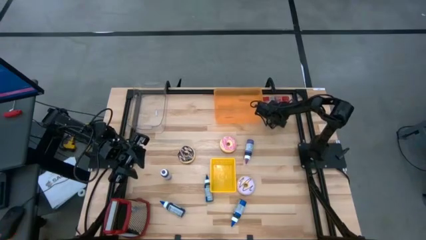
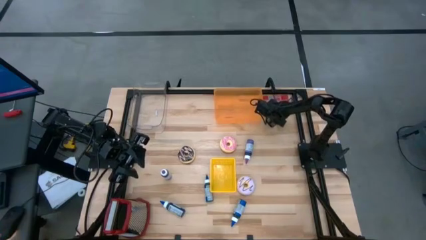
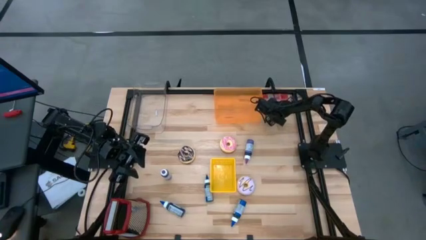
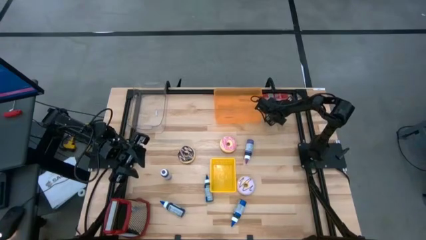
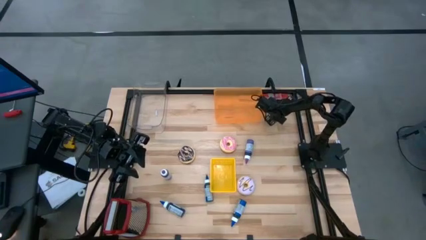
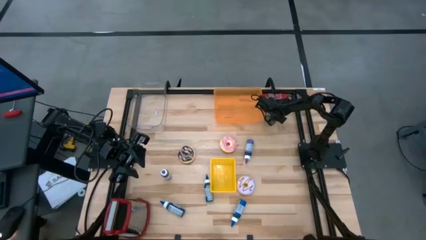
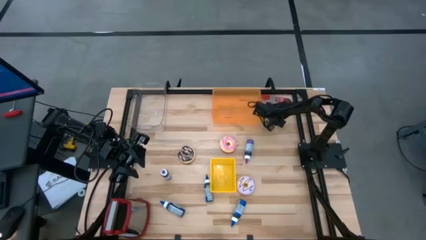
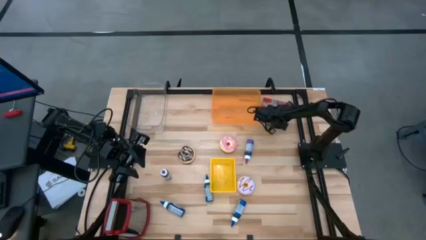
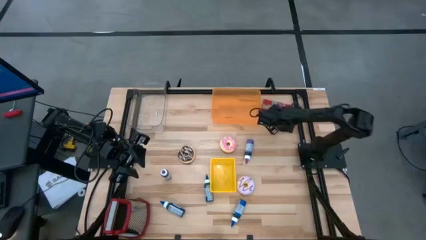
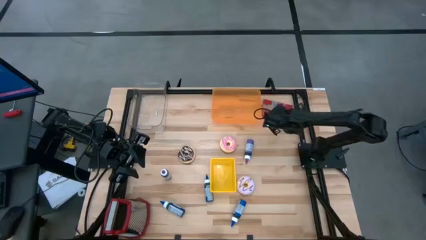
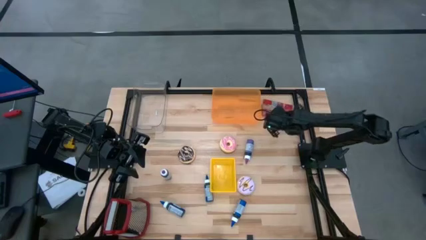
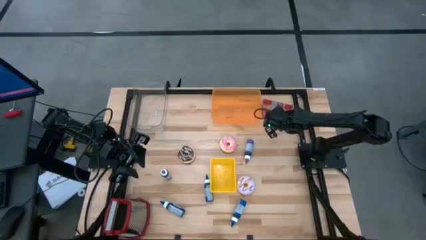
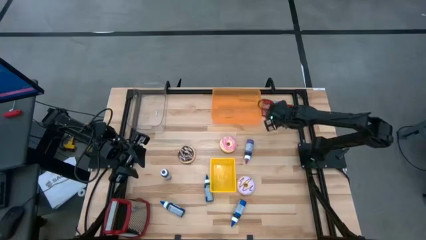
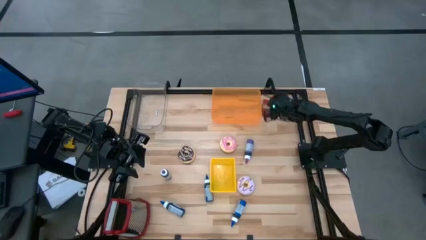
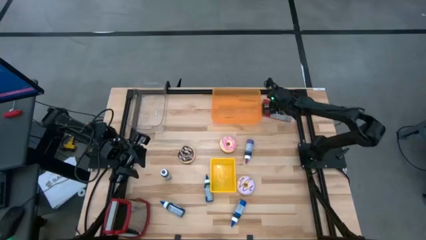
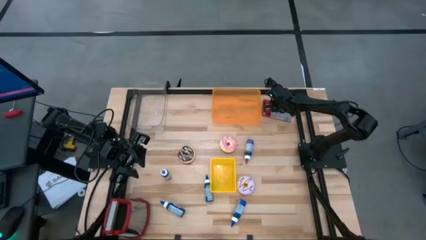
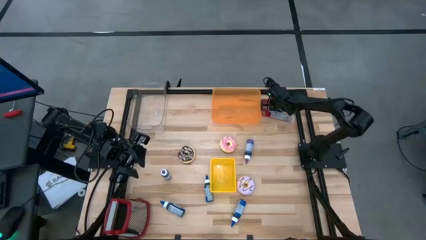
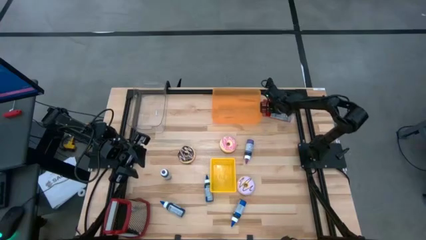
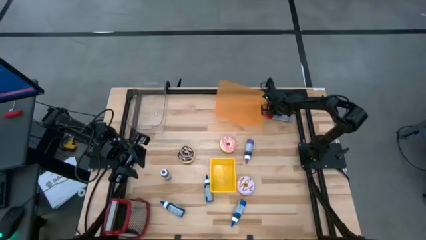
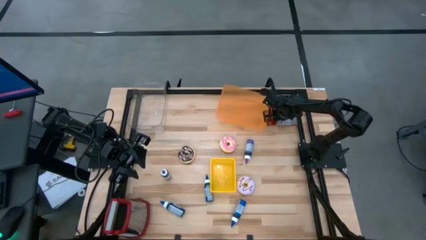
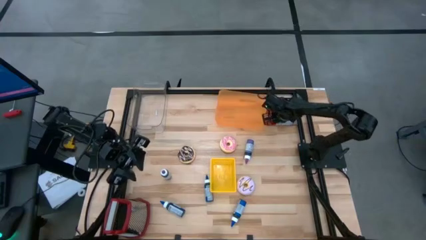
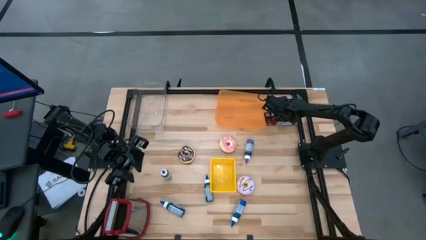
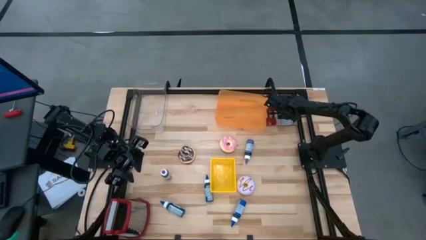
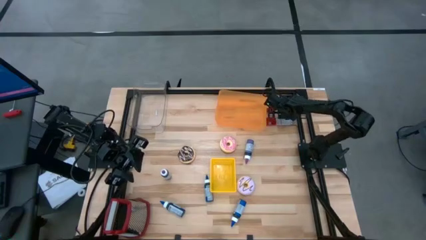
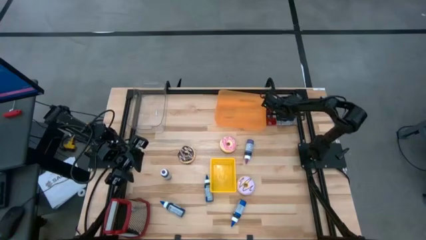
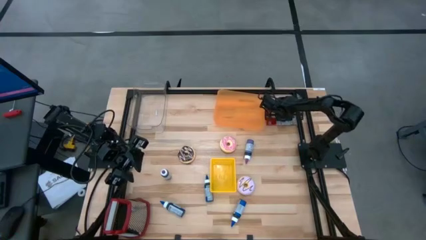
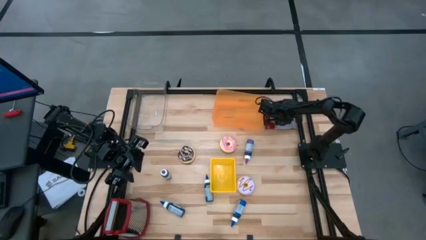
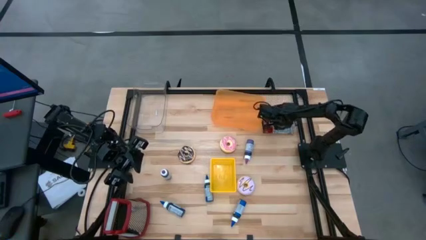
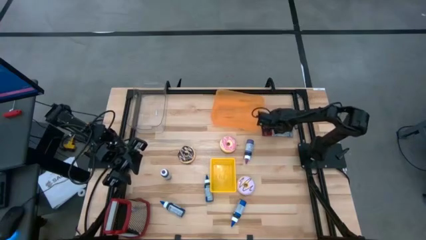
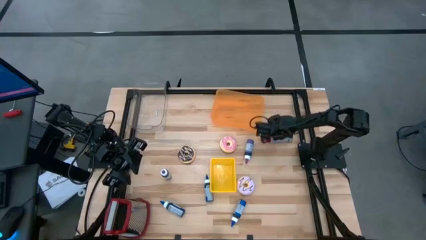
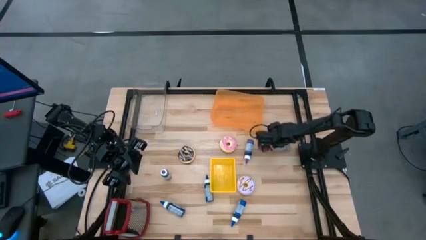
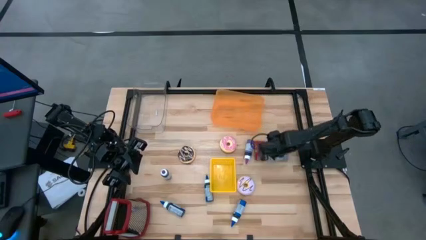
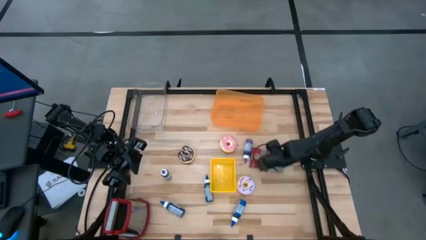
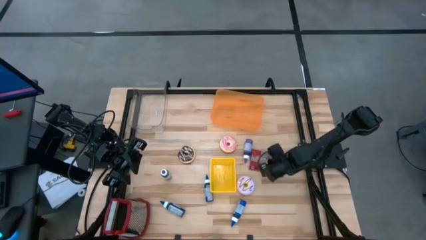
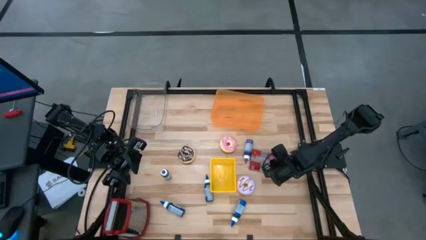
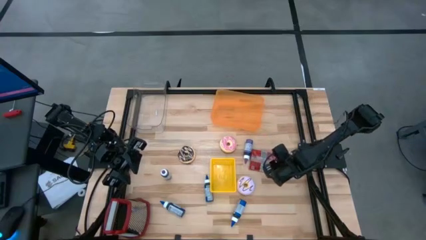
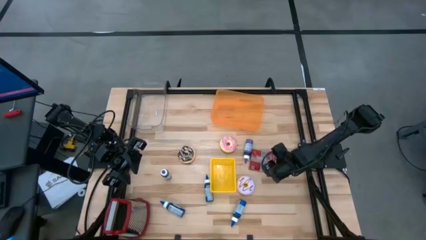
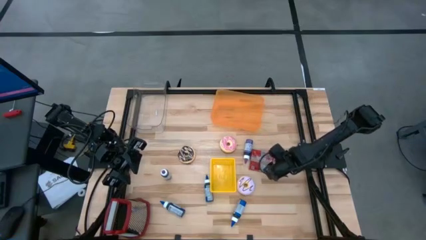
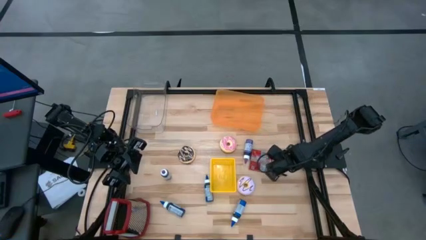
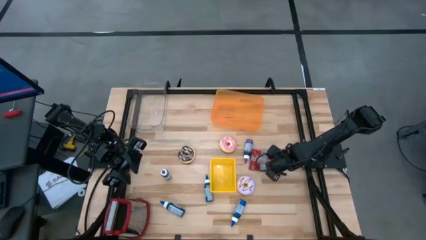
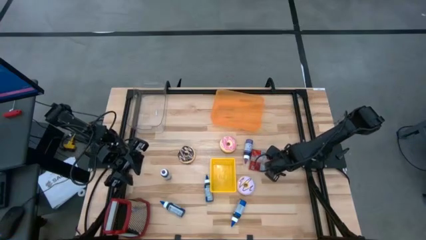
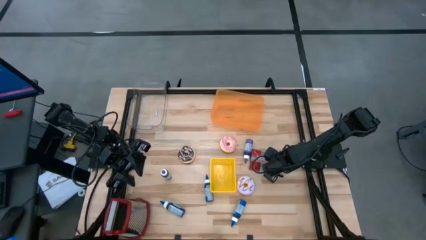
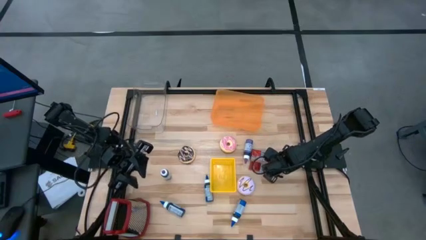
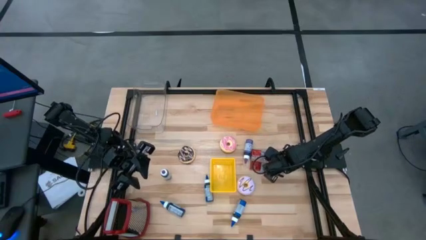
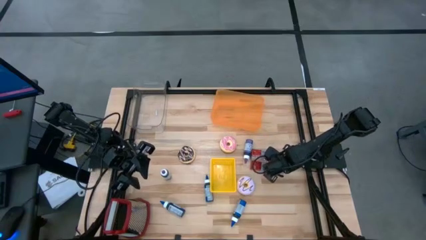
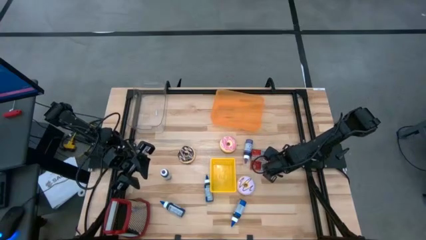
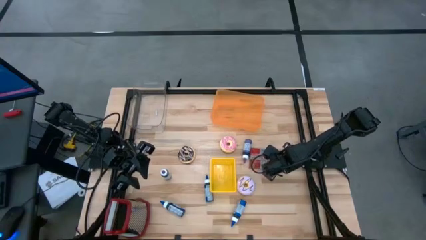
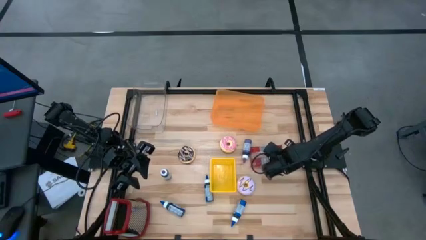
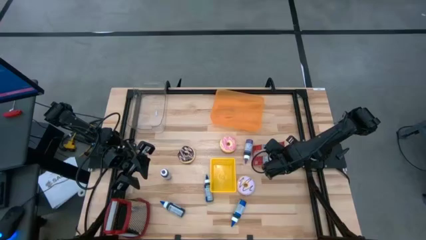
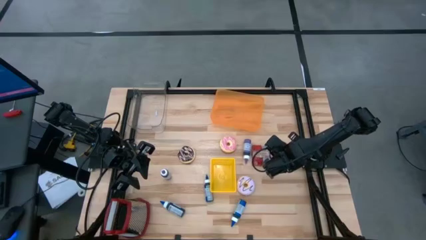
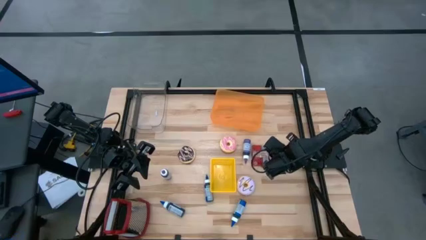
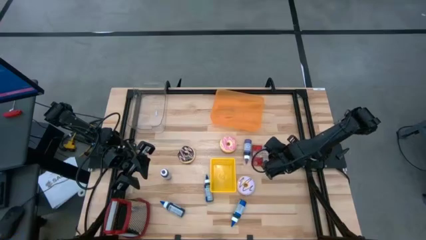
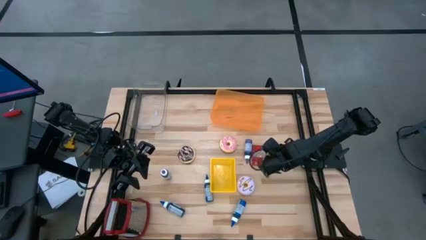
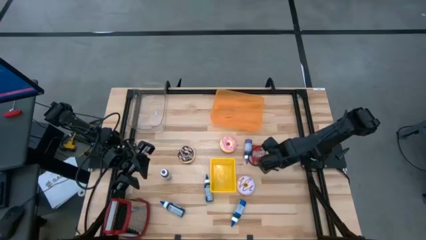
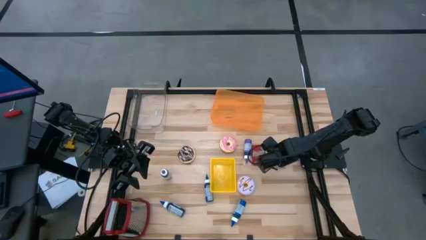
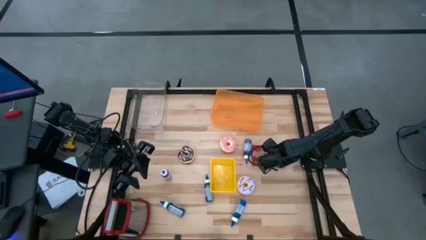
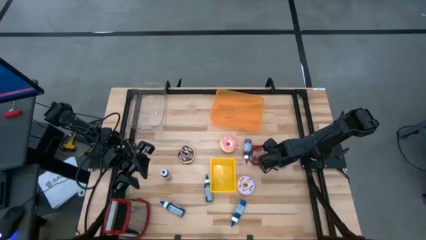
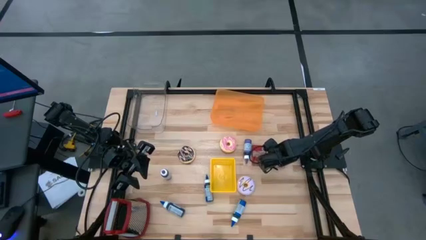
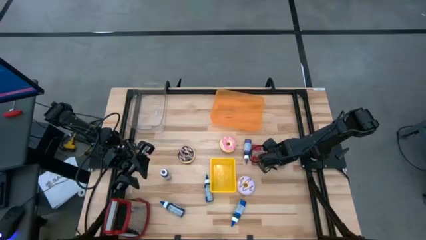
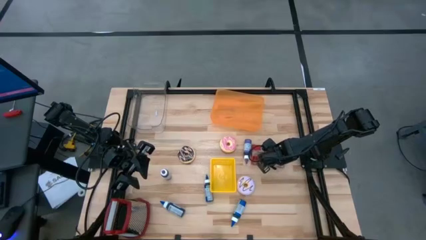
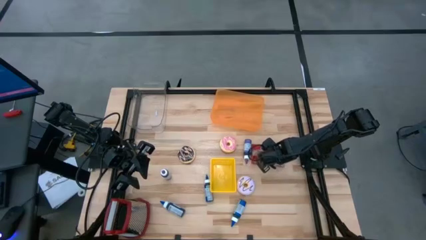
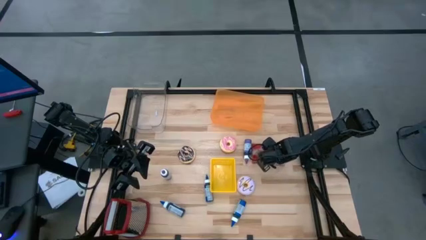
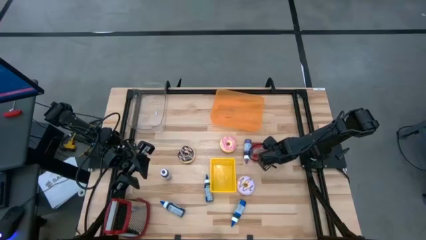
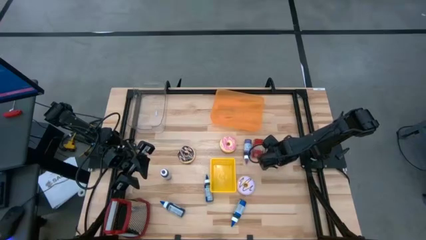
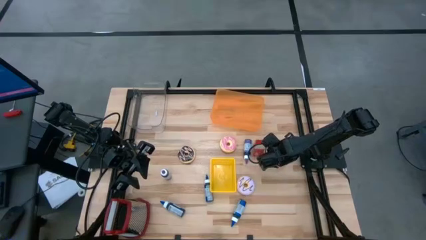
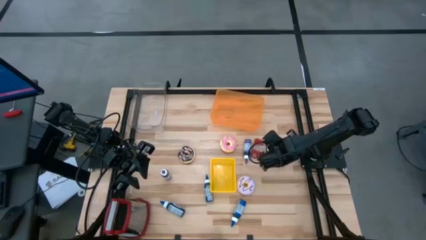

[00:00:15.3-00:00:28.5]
Put the red popcorn bag into the orange bin
